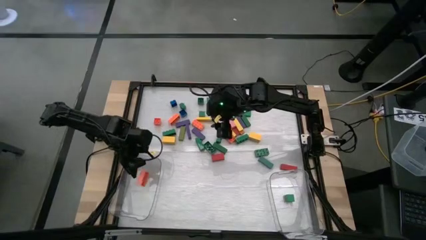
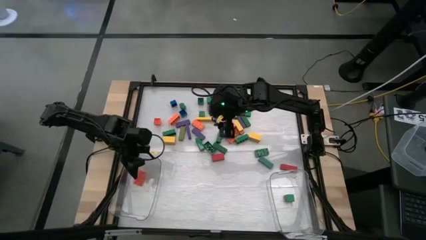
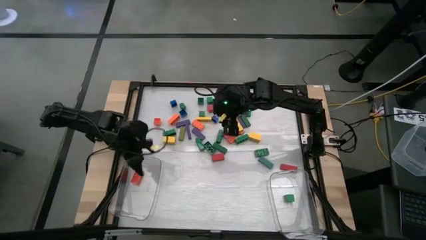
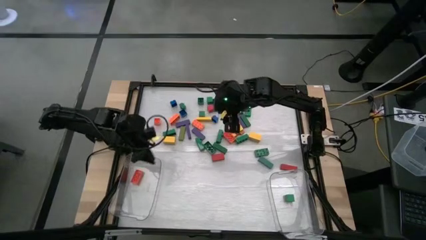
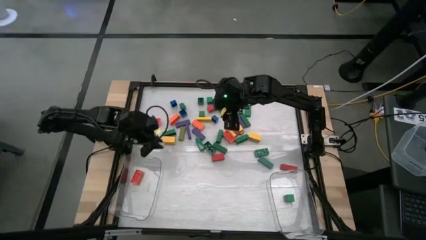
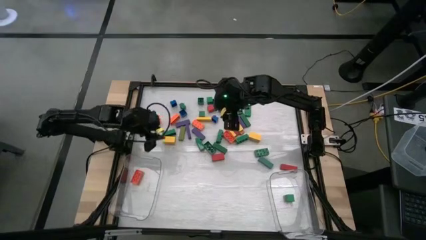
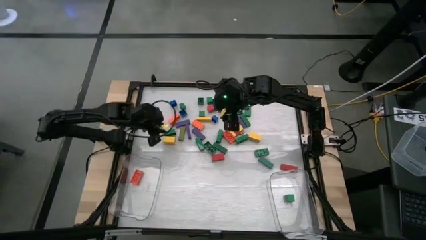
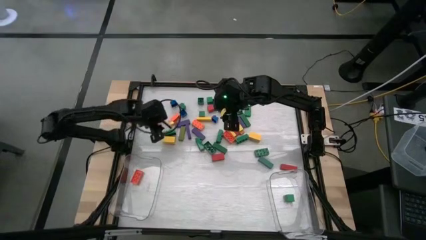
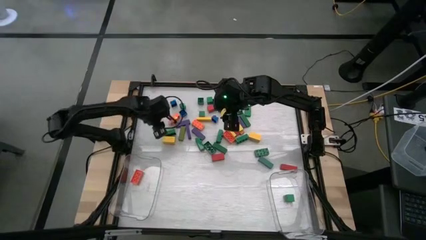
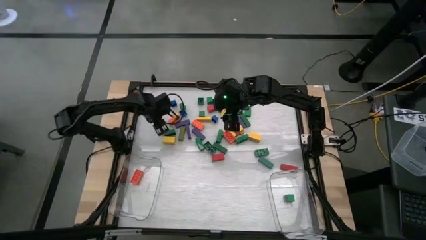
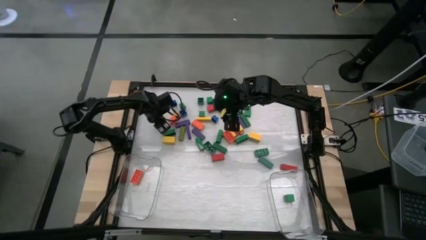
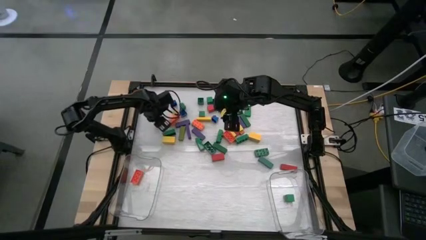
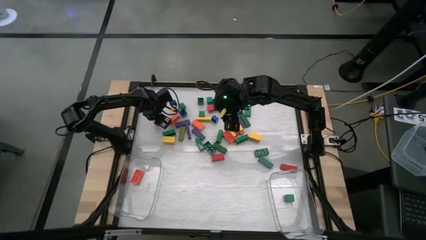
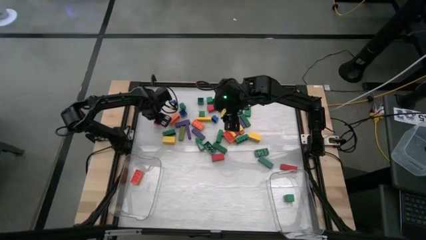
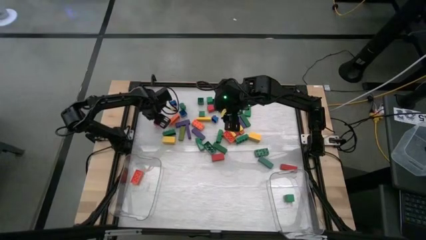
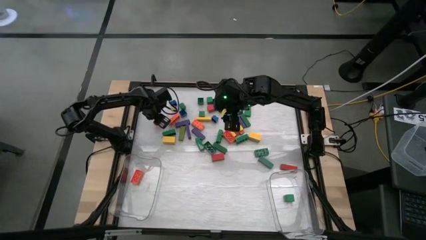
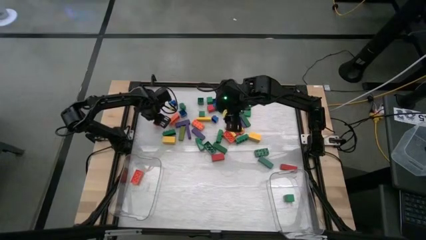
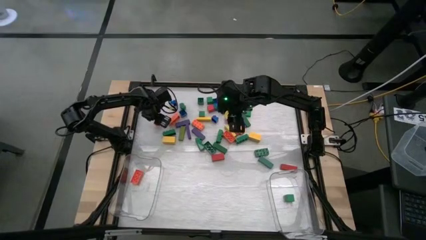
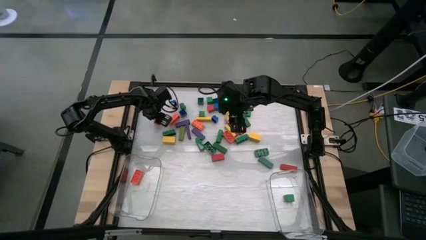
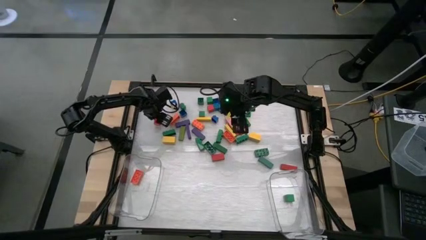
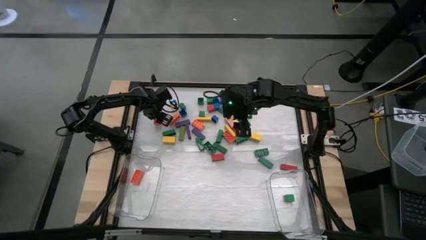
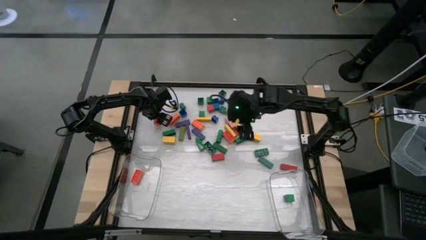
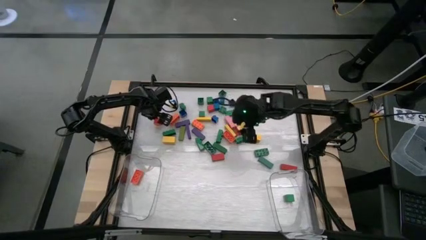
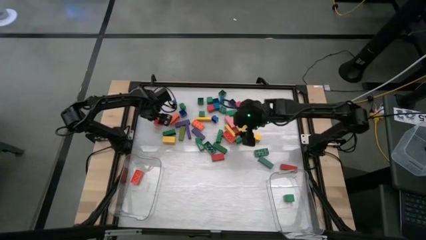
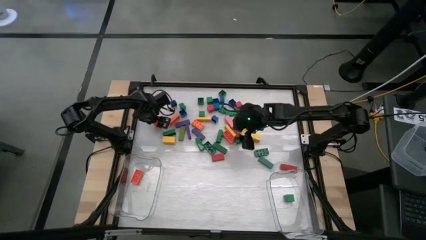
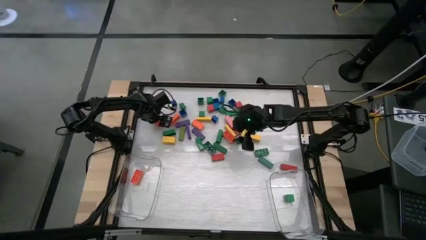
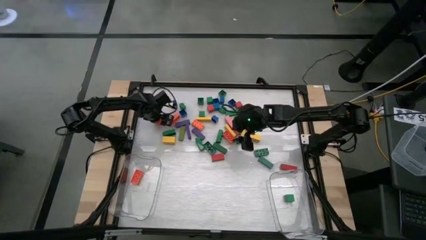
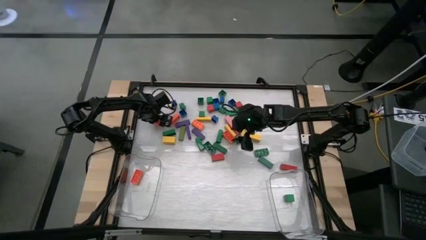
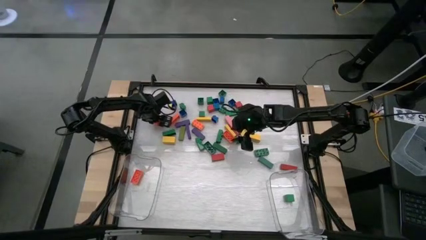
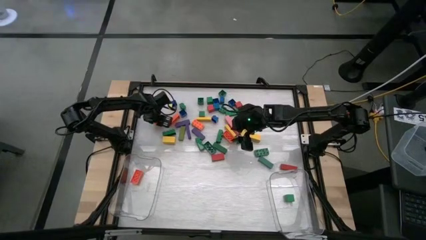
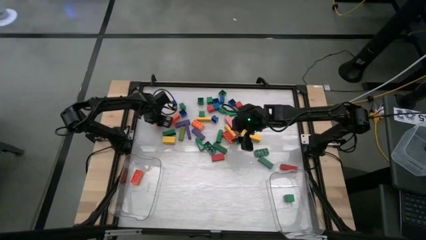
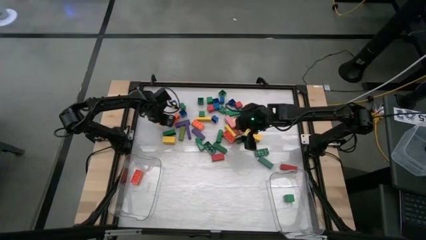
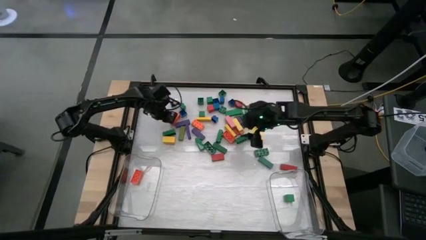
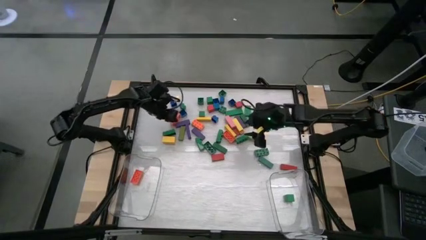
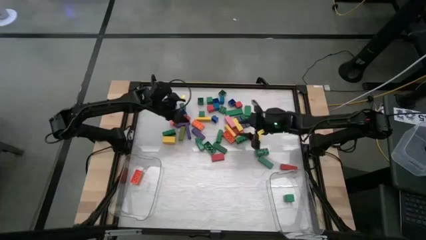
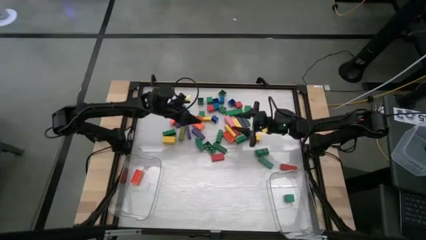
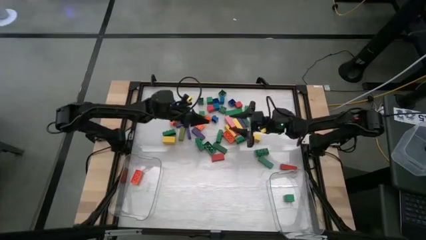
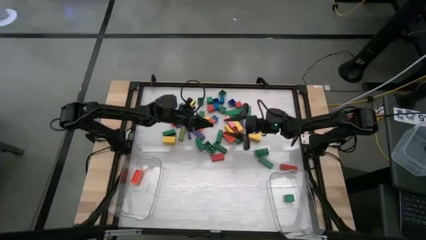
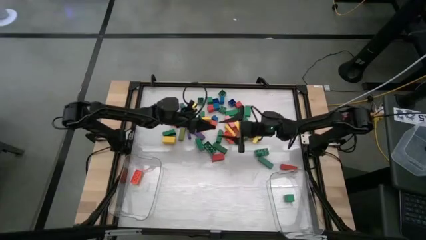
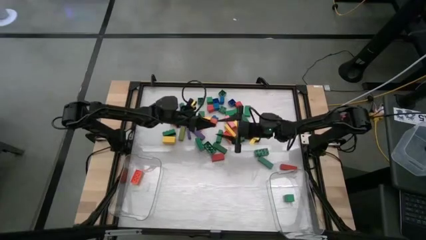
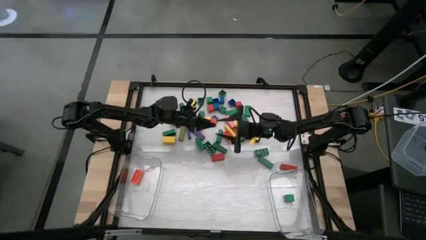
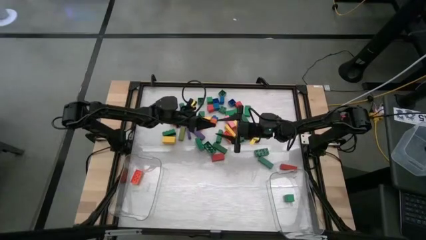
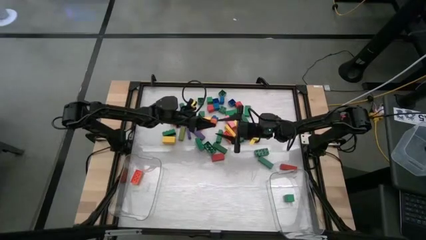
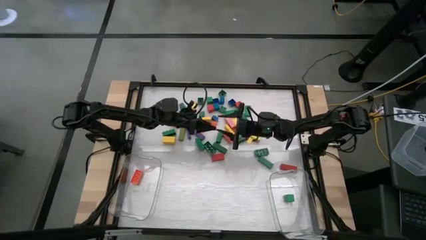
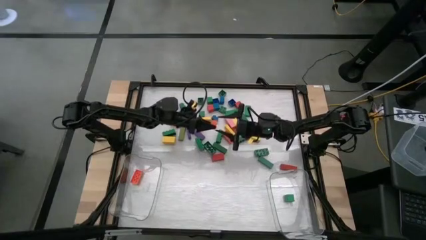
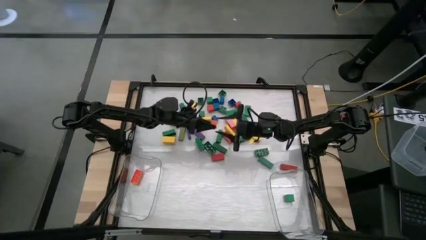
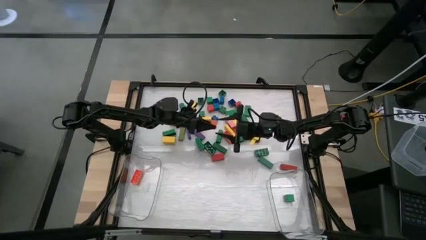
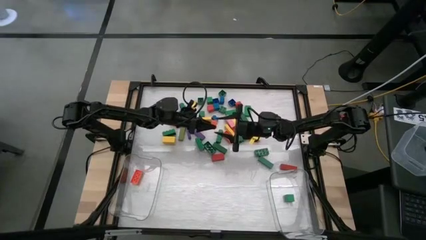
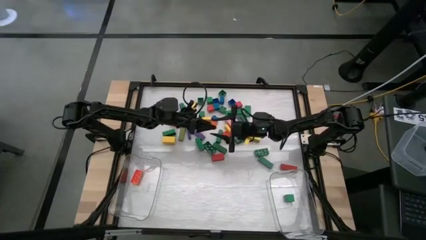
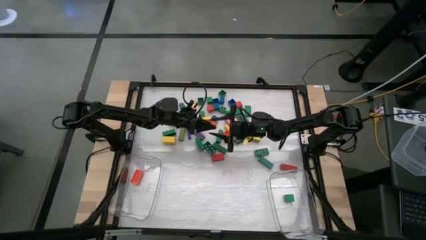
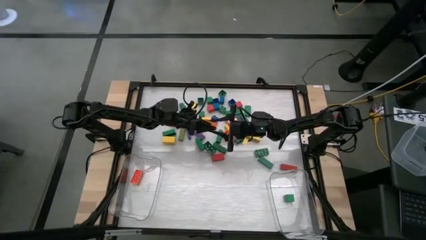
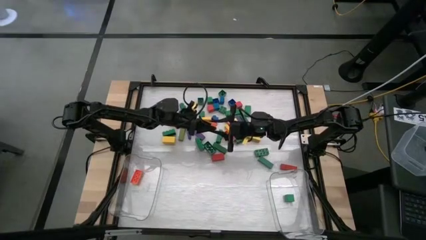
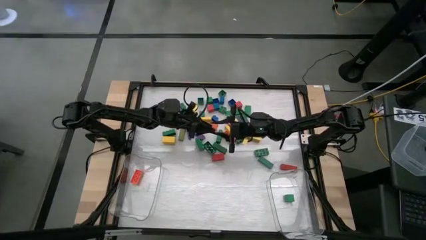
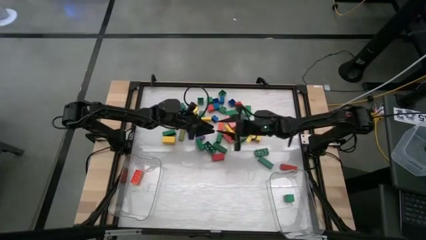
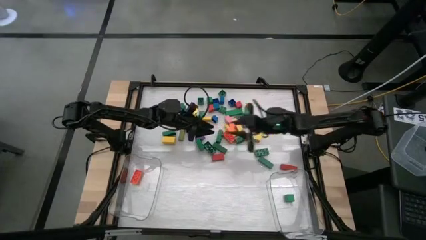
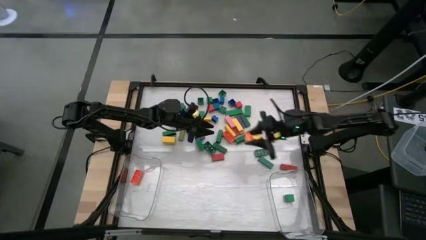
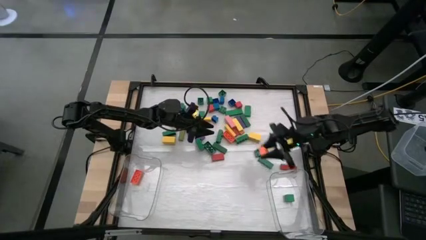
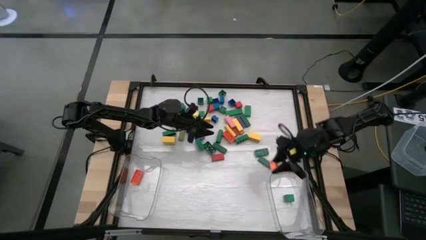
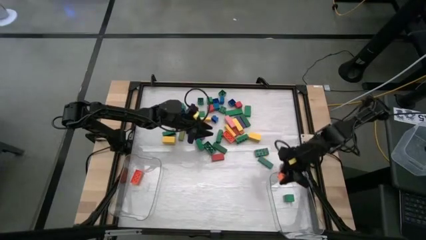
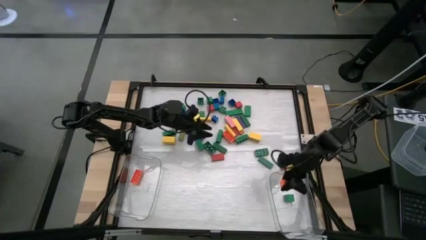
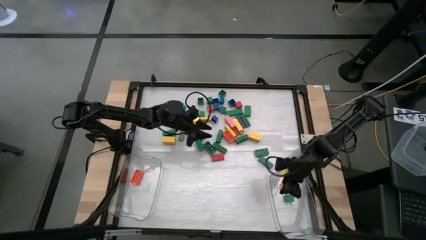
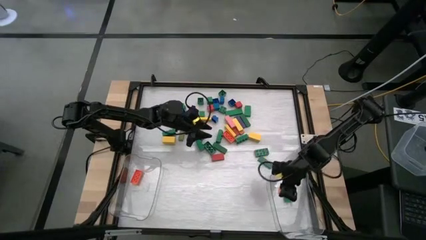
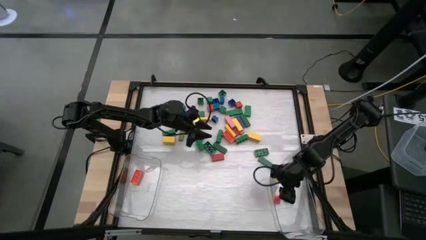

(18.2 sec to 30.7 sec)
Task: Sort blocks by size
Put the small orange game piece into the right transparent bin

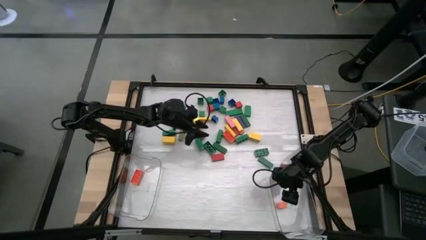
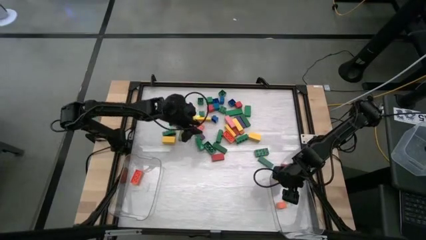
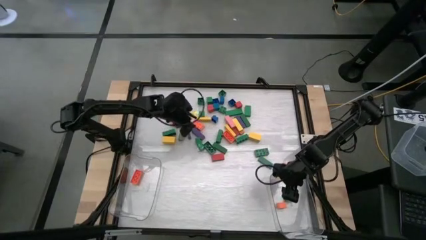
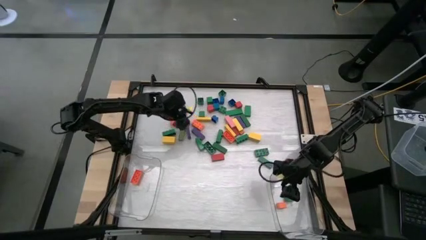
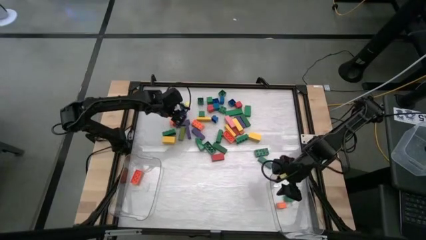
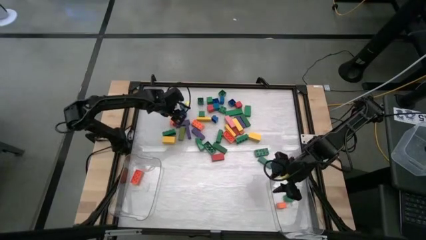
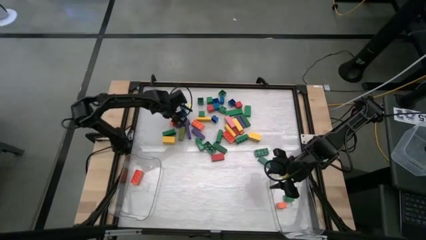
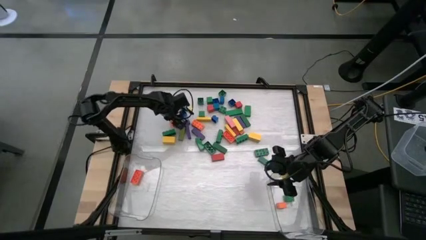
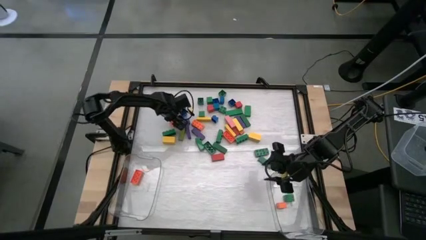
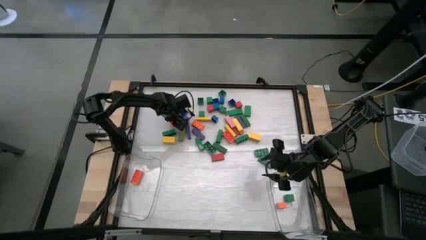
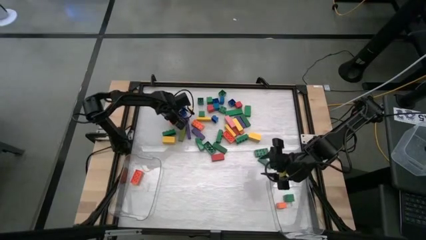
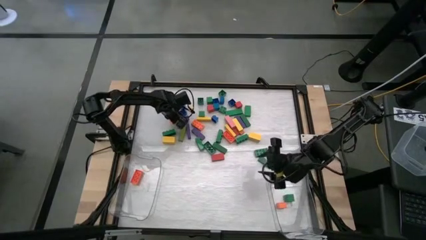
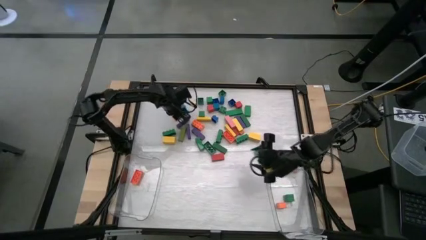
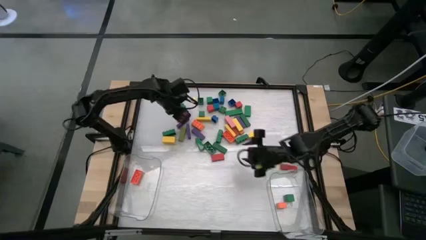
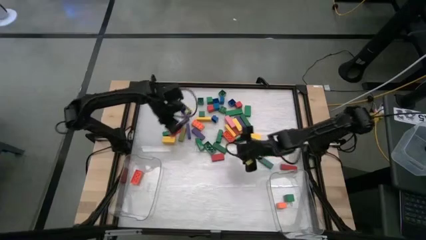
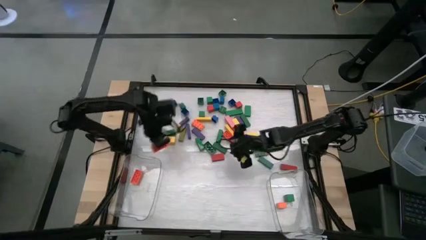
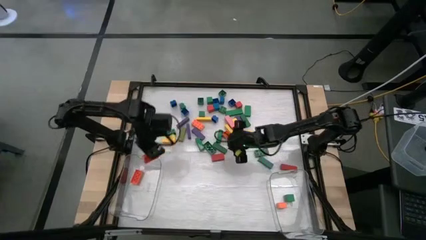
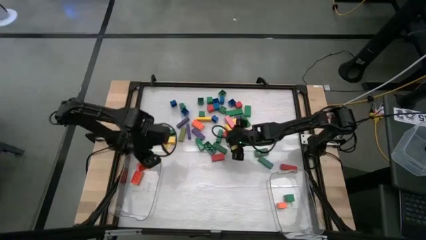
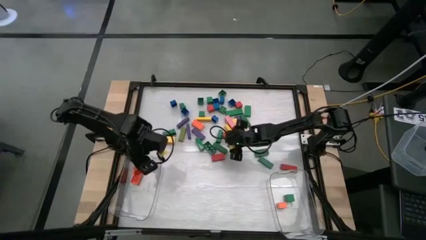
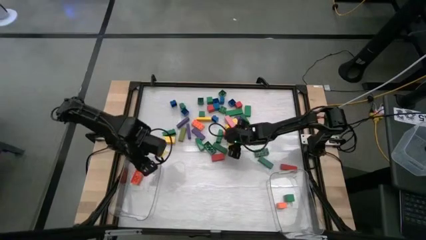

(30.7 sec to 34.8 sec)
Put the large orange game piece into the left transparent bin
